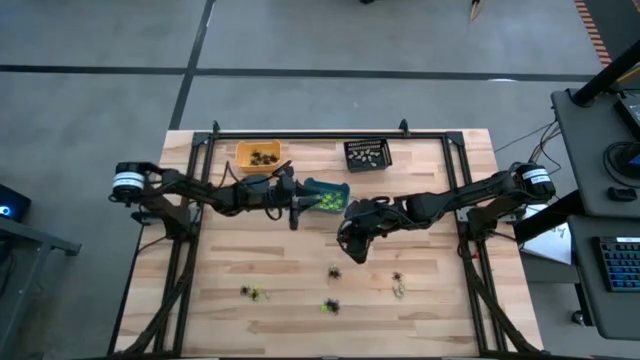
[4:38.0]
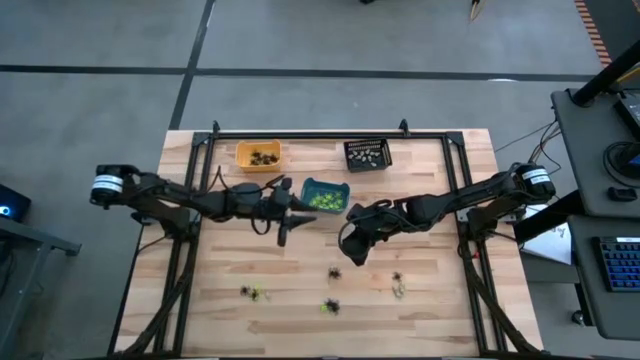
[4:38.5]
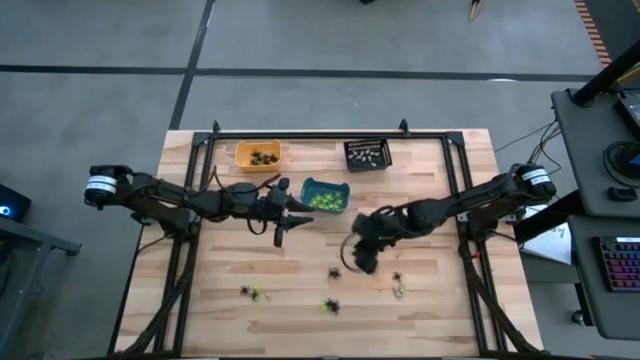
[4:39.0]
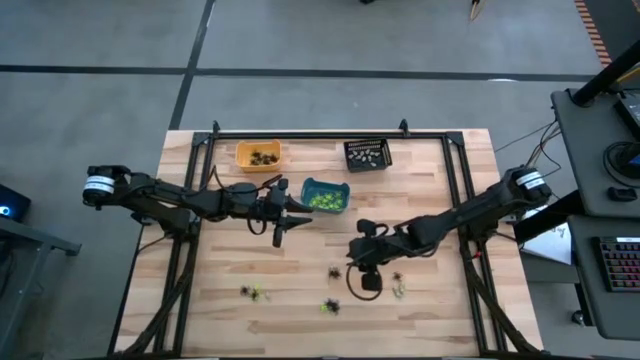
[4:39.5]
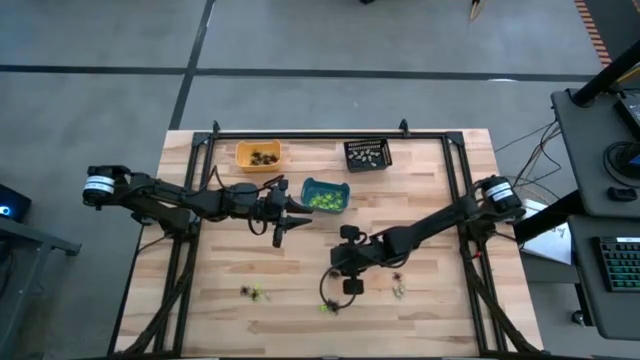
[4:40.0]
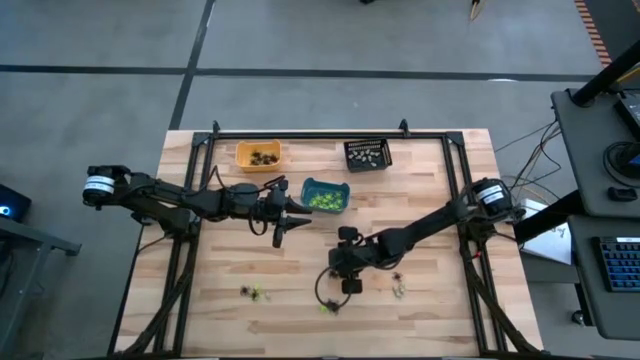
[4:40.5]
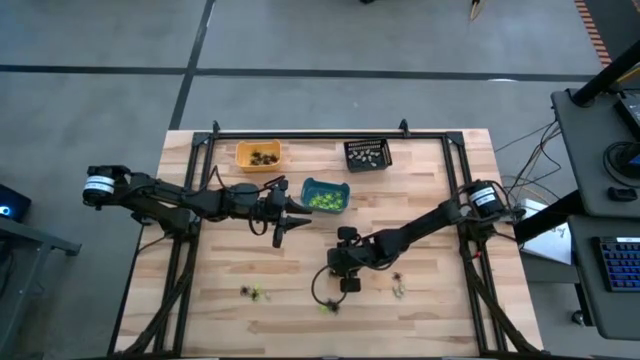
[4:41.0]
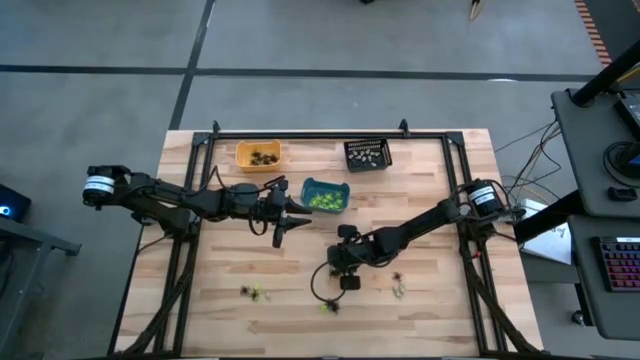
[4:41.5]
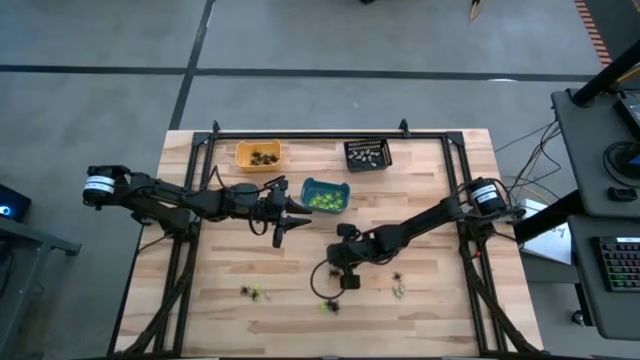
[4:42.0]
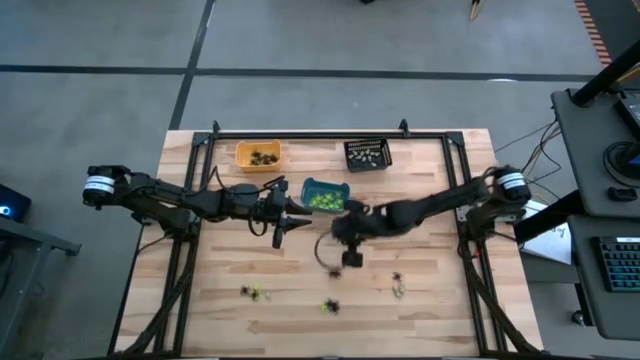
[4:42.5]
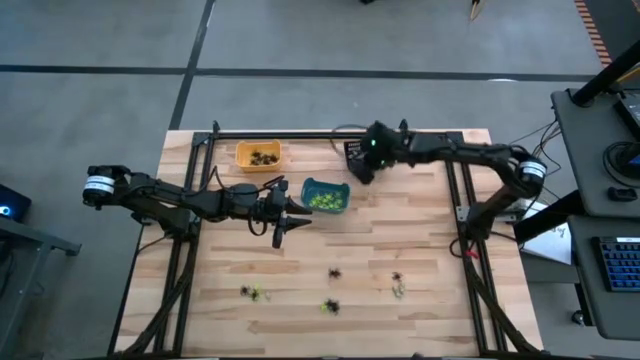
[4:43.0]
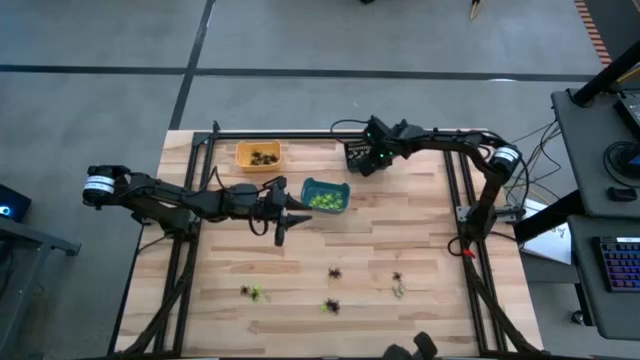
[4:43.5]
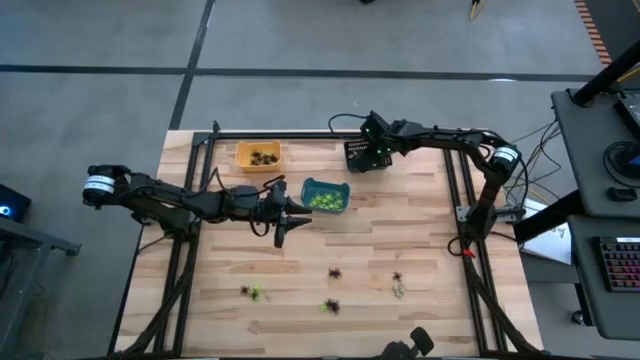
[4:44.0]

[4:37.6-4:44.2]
Task: Sort Halloween decoration
Put the white skull toy into the black bin

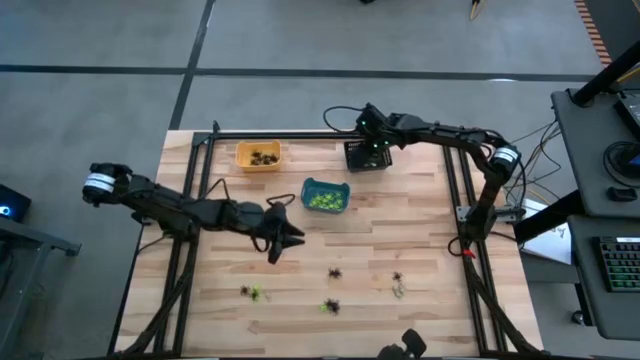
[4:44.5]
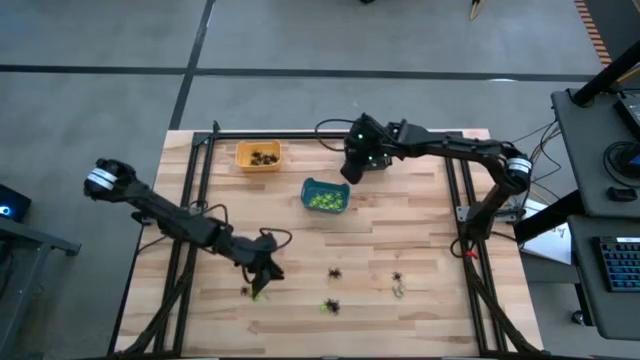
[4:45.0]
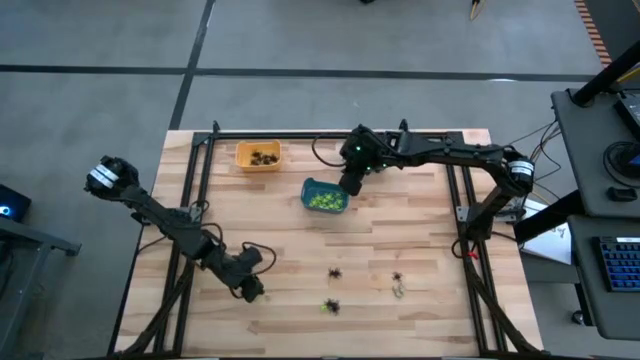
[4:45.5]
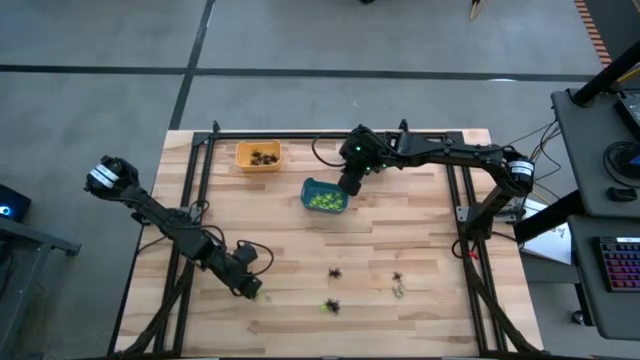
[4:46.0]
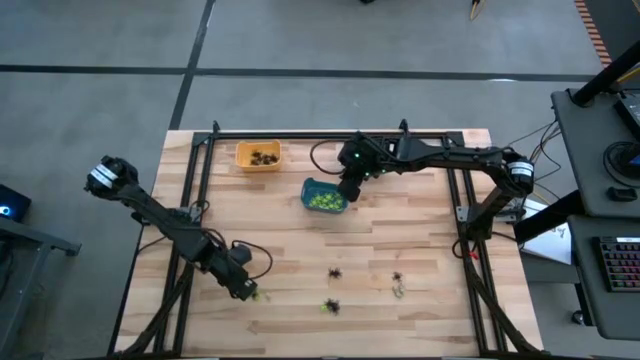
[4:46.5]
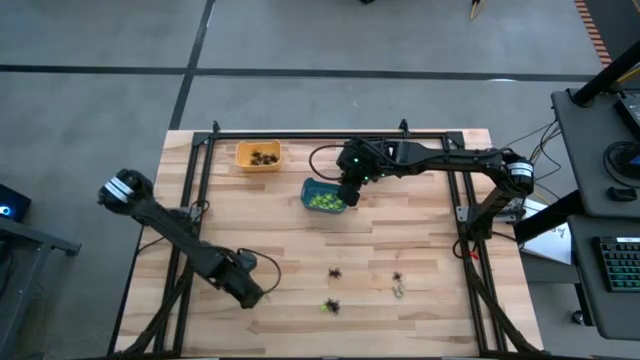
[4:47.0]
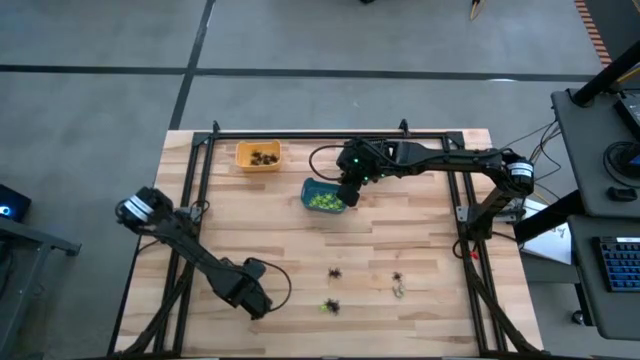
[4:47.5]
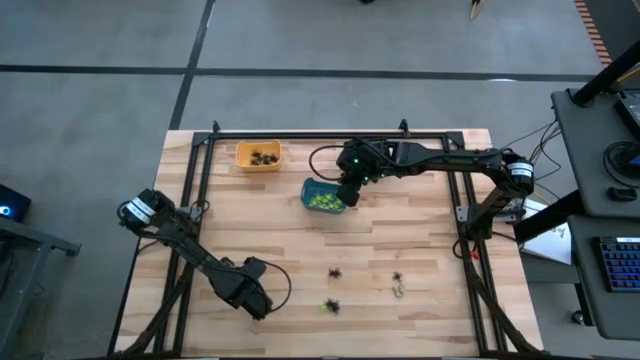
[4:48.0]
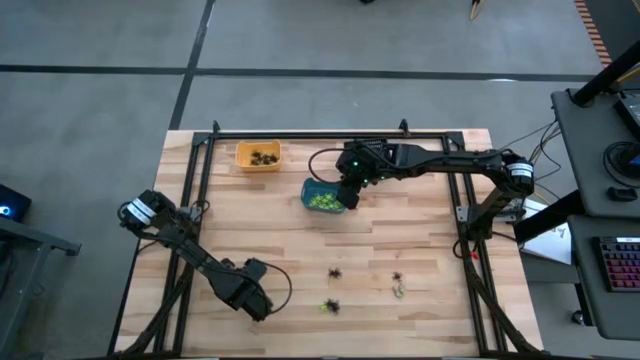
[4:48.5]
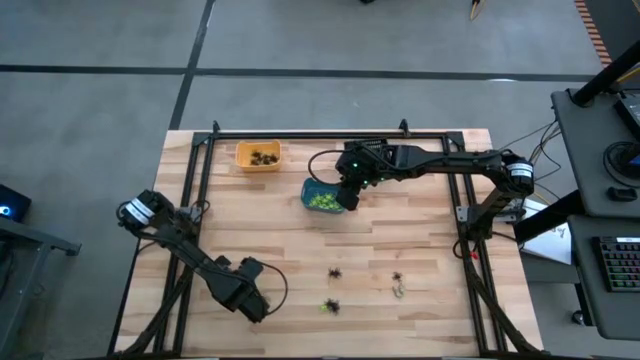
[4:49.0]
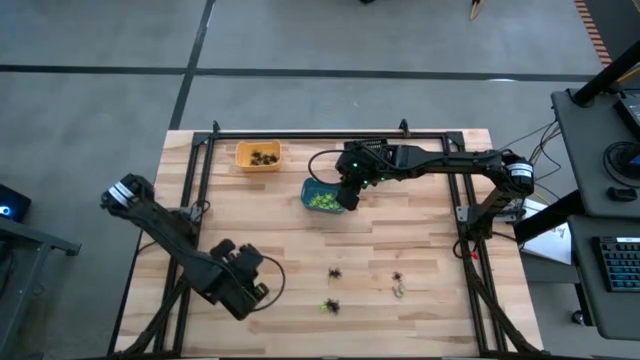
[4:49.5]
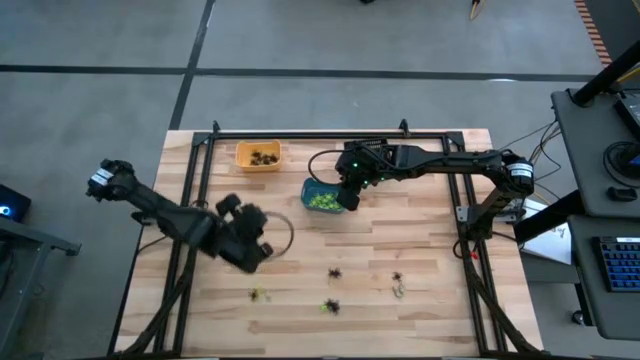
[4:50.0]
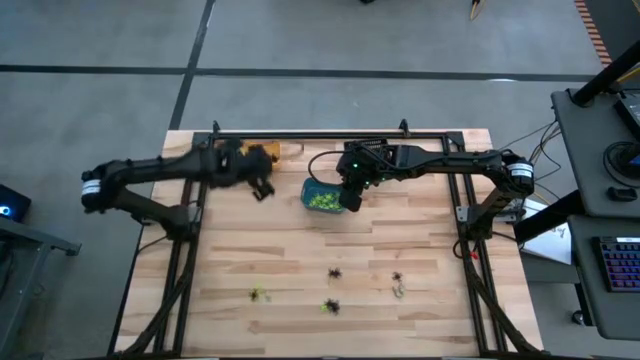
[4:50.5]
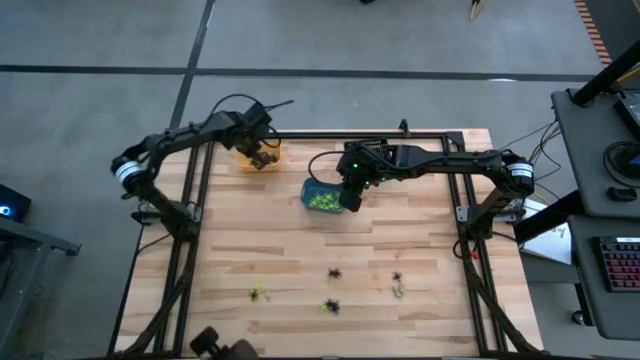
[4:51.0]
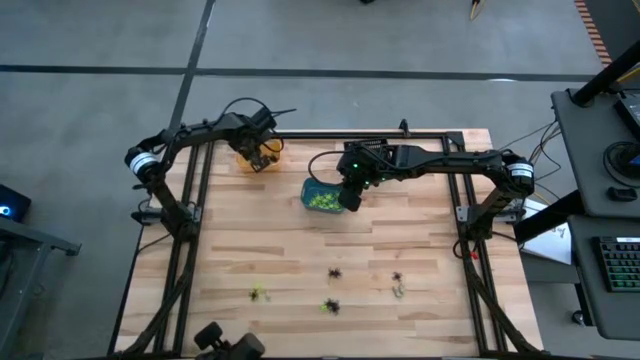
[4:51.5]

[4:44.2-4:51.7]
Put the black spider toy into the yellow bin

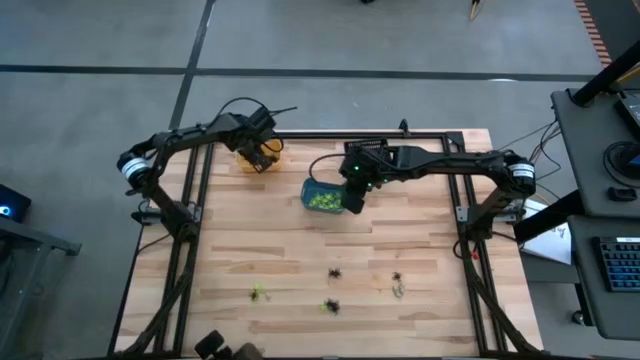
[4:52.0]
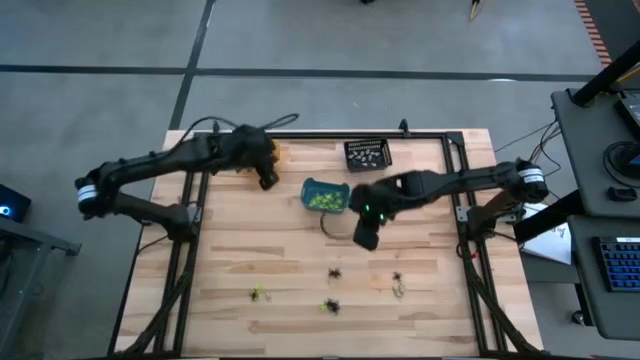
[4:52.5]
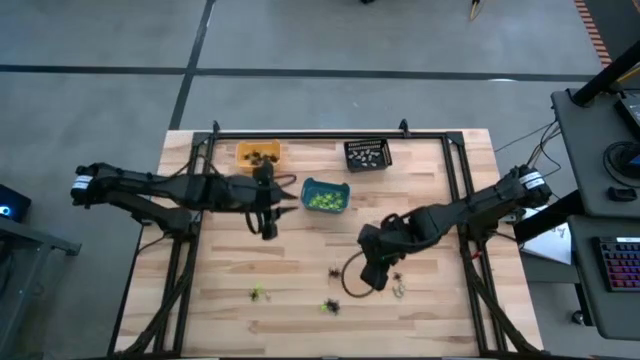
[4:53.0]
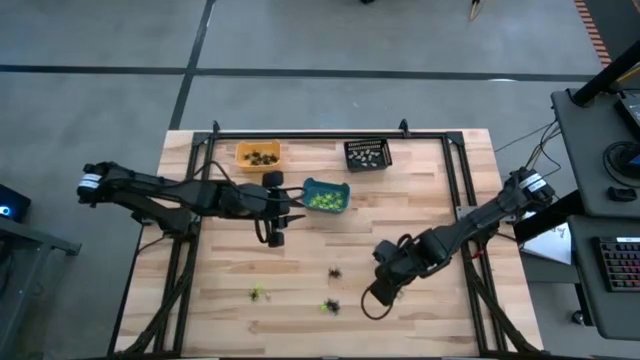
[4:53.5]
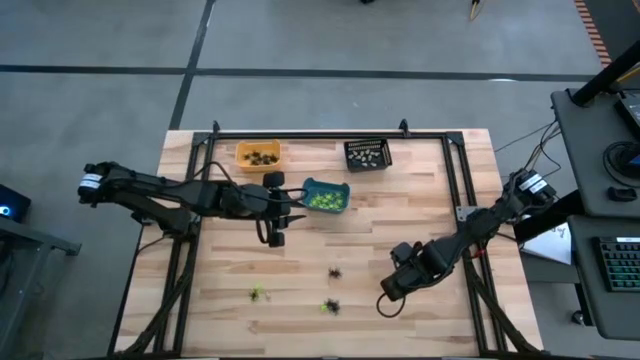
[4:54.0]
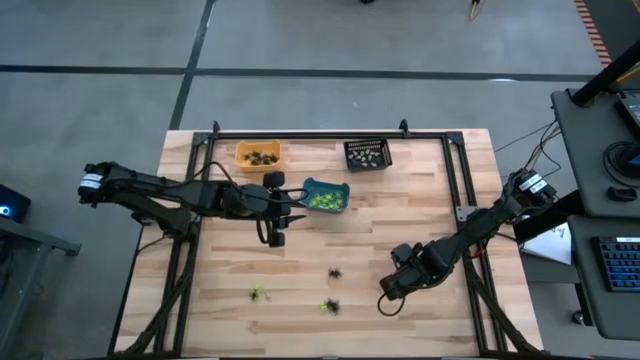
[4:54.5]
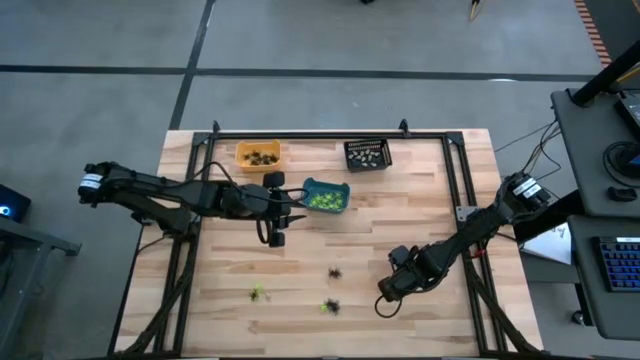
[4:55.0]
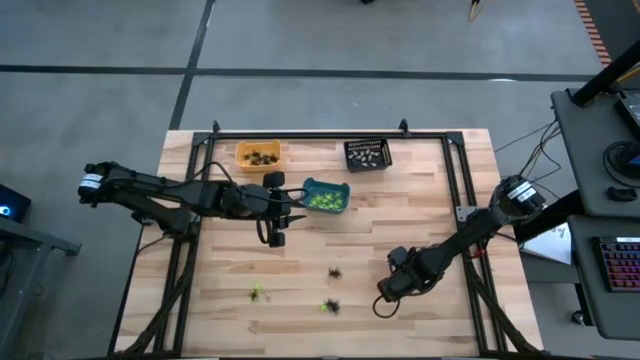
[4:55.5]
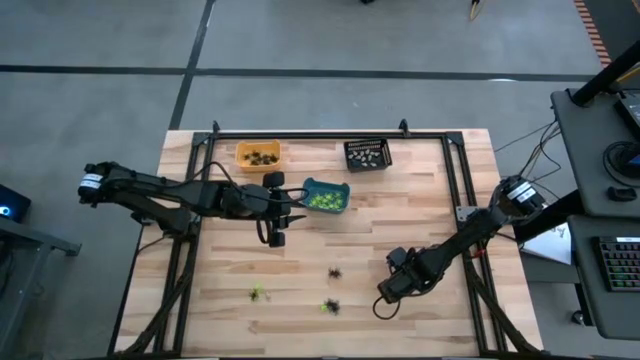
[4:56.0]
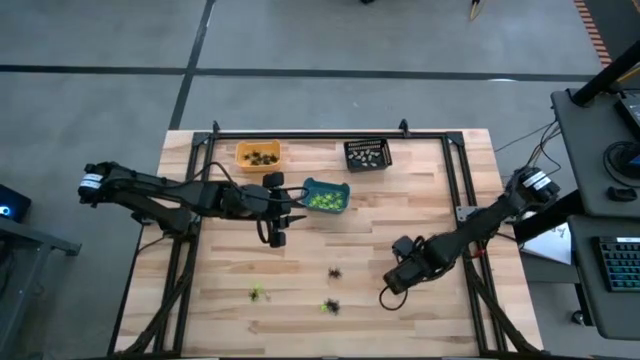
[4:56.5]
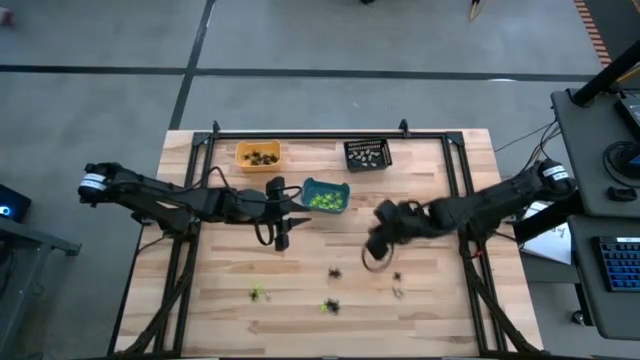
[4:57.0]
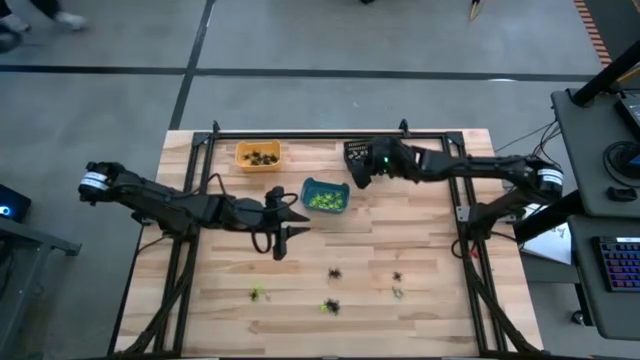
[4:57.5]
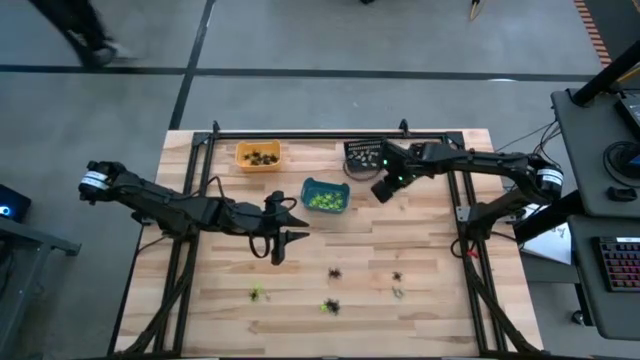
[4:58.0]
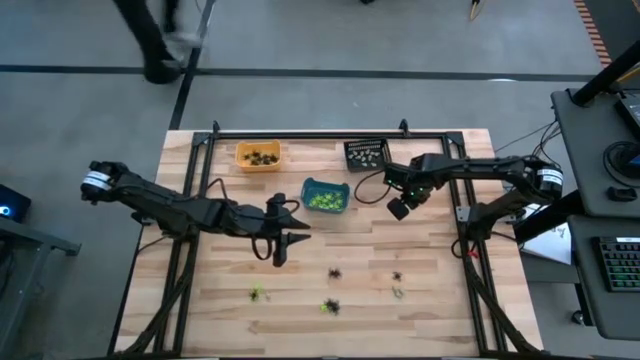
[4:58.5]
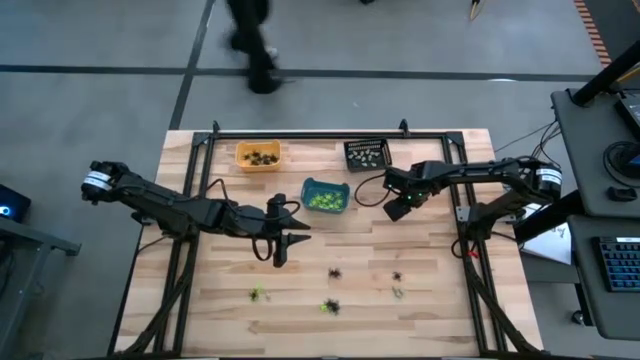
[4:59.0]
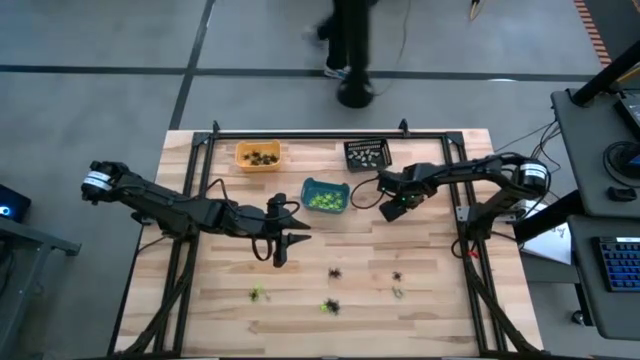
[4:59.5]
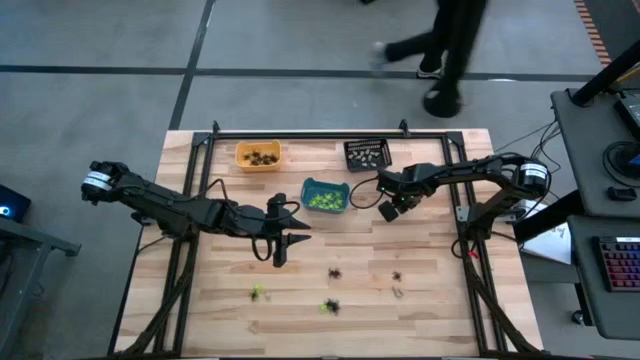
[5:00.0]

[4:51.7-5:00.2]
Put the white skull toy into the black bin
